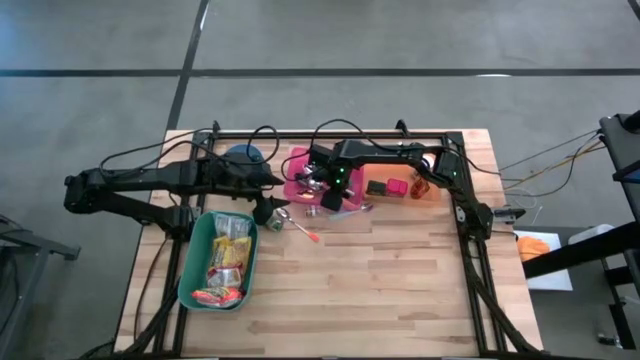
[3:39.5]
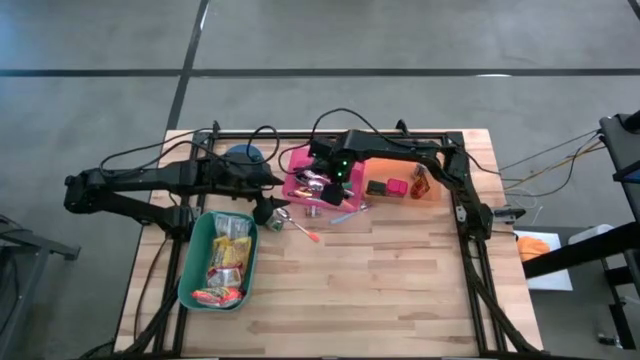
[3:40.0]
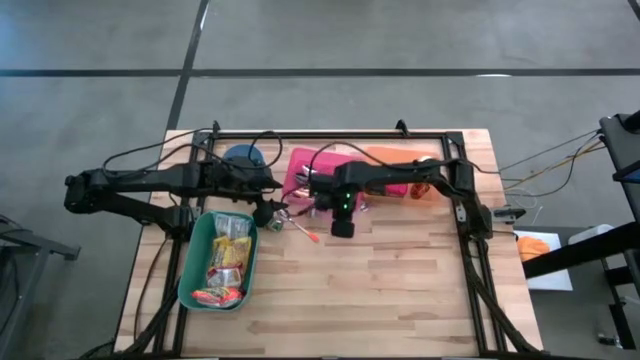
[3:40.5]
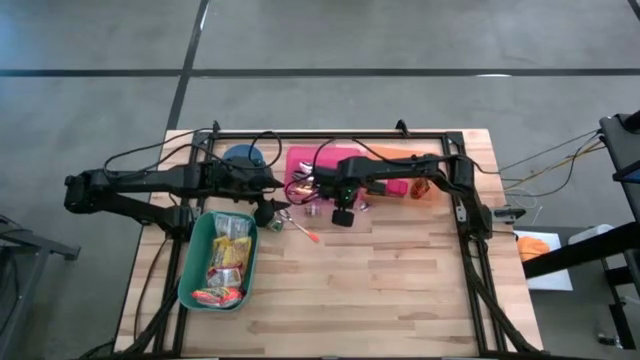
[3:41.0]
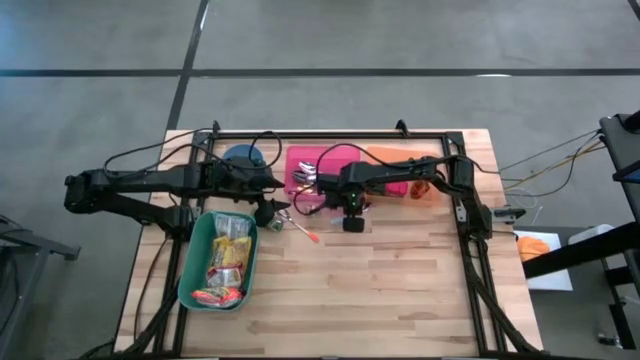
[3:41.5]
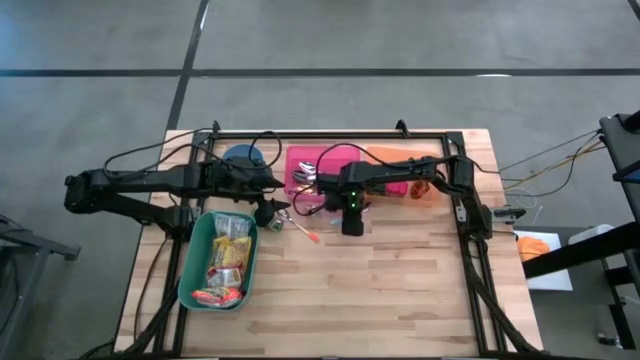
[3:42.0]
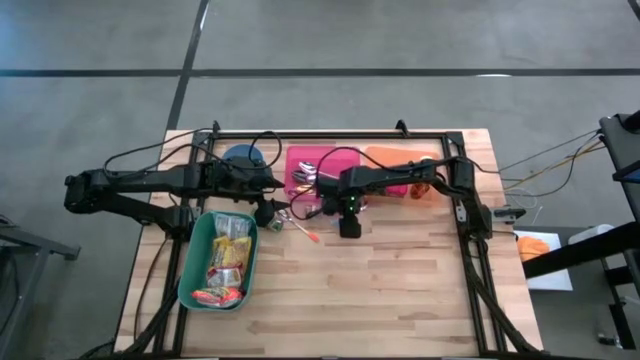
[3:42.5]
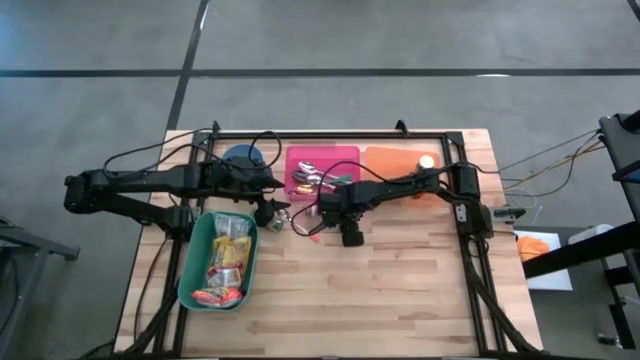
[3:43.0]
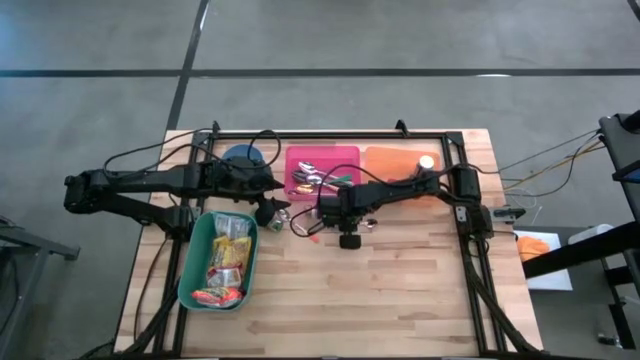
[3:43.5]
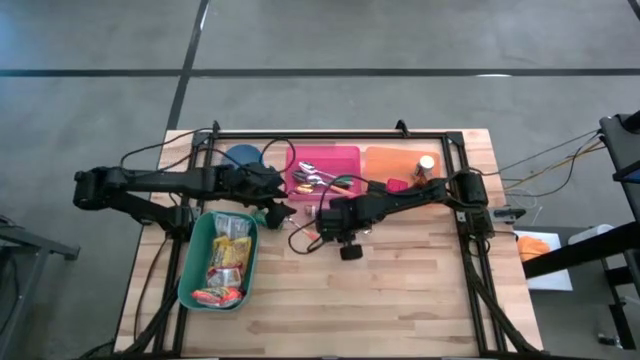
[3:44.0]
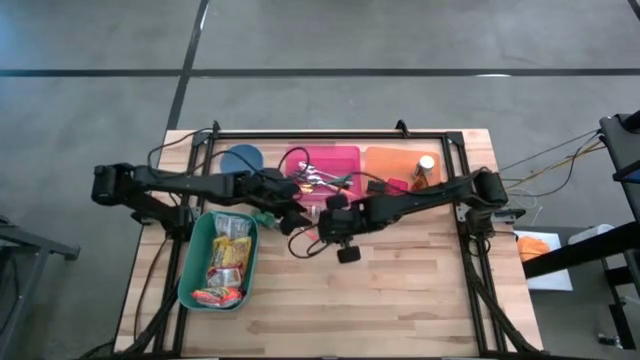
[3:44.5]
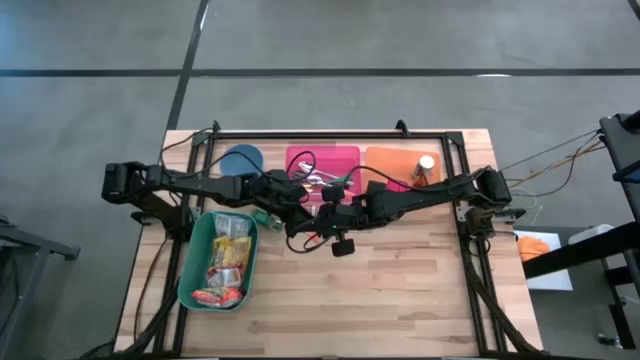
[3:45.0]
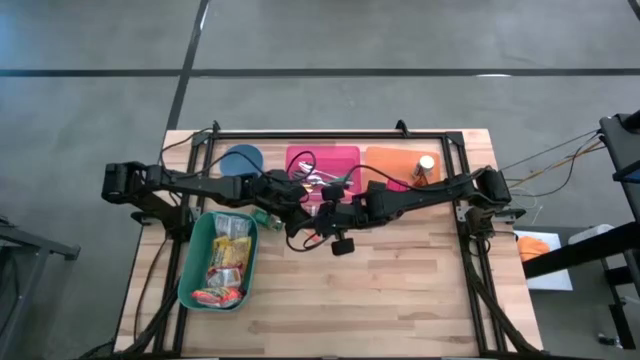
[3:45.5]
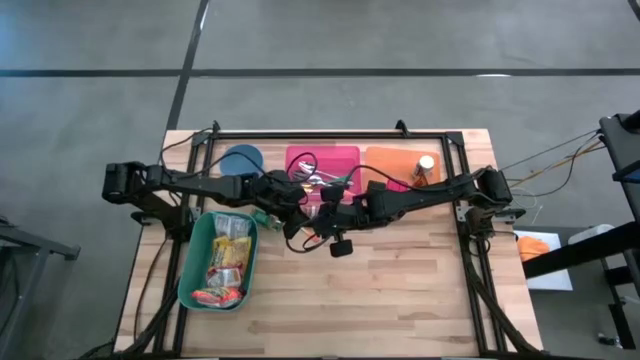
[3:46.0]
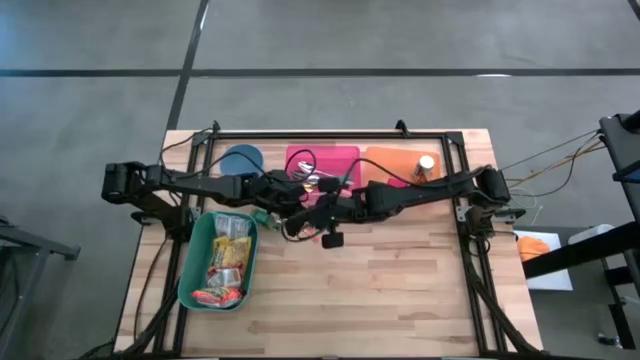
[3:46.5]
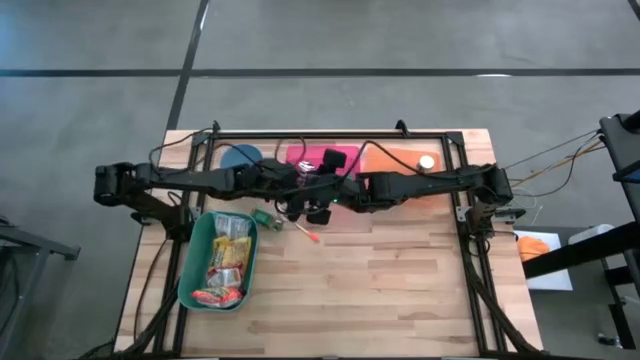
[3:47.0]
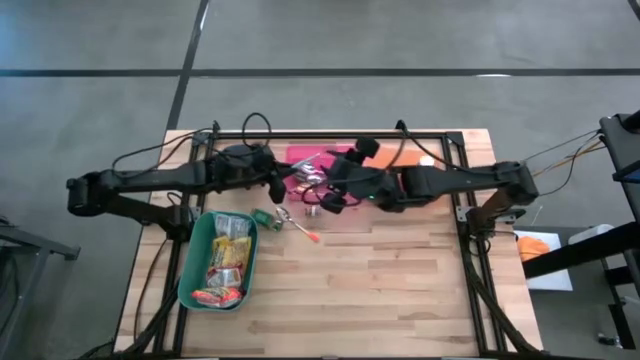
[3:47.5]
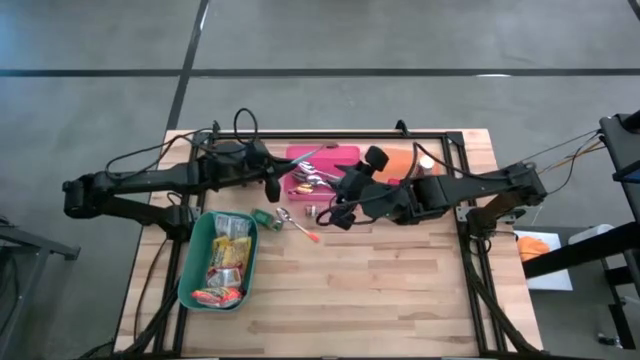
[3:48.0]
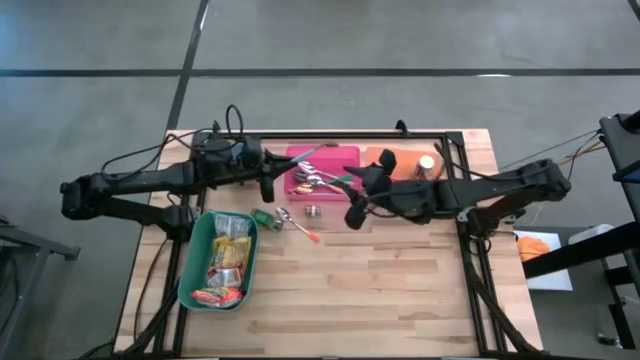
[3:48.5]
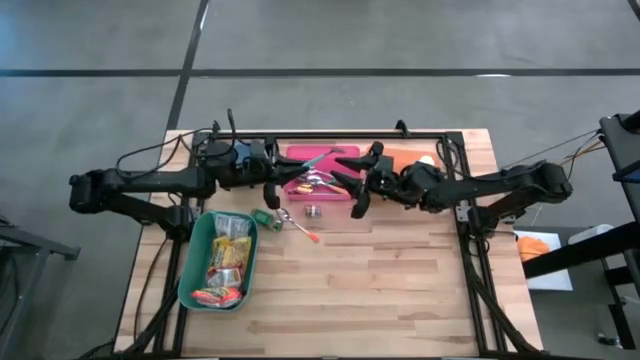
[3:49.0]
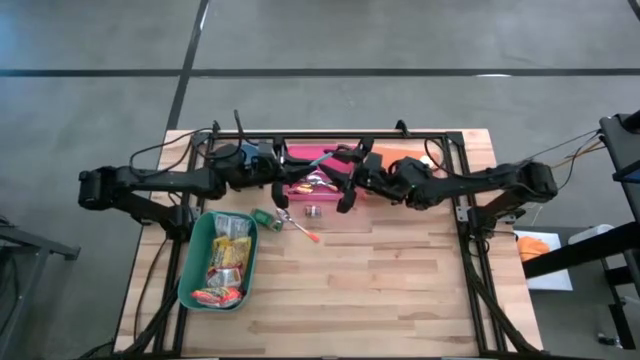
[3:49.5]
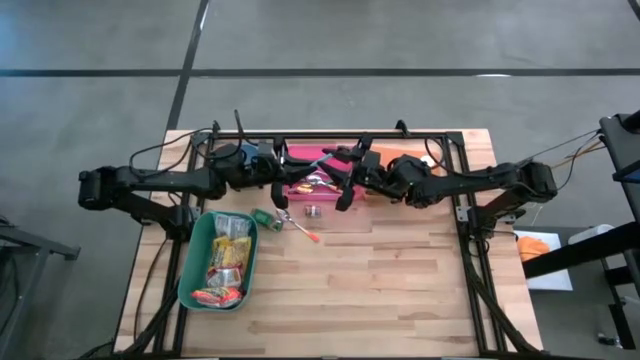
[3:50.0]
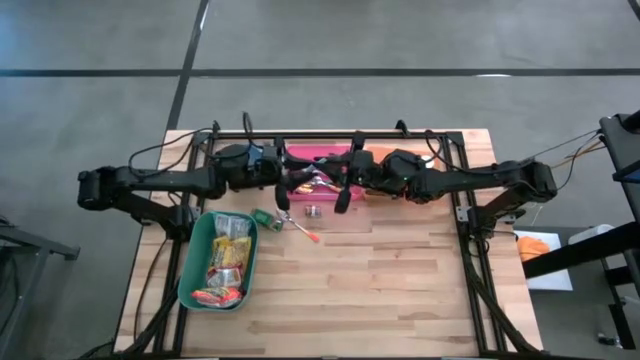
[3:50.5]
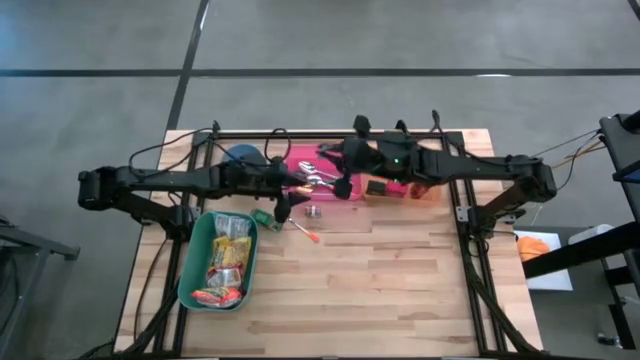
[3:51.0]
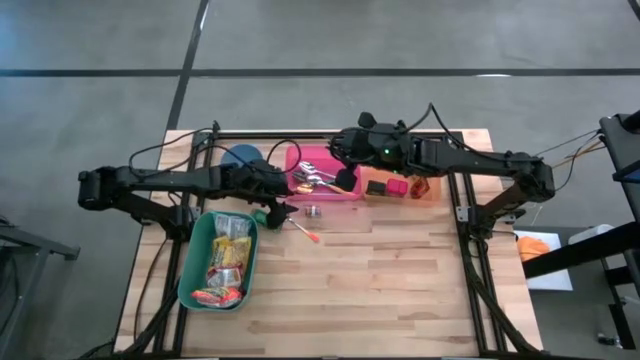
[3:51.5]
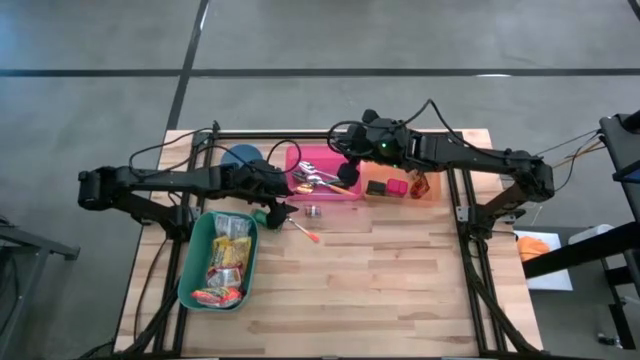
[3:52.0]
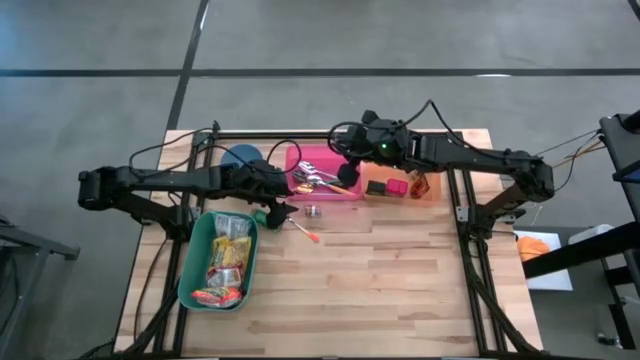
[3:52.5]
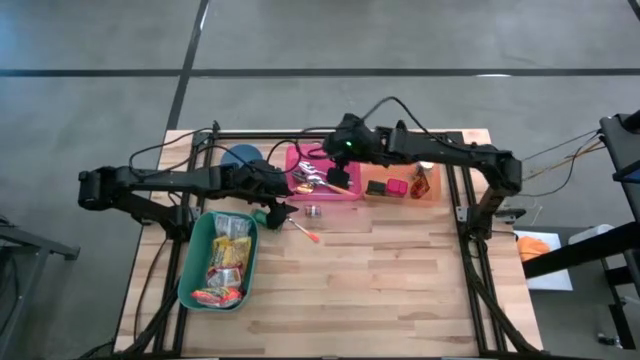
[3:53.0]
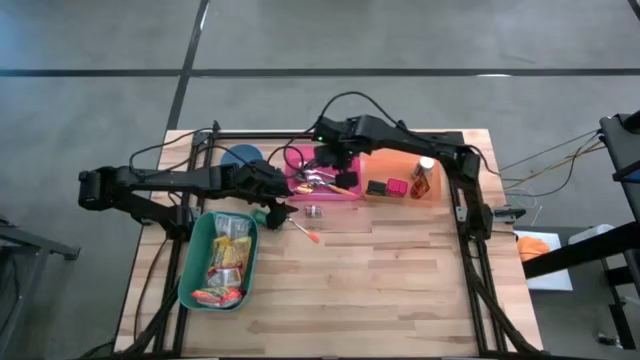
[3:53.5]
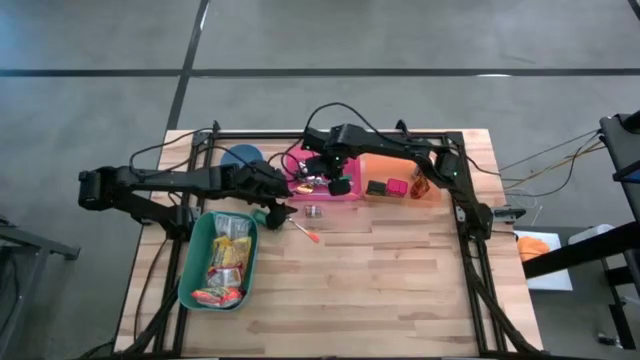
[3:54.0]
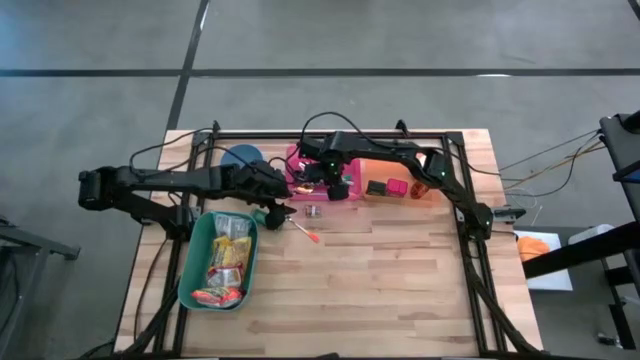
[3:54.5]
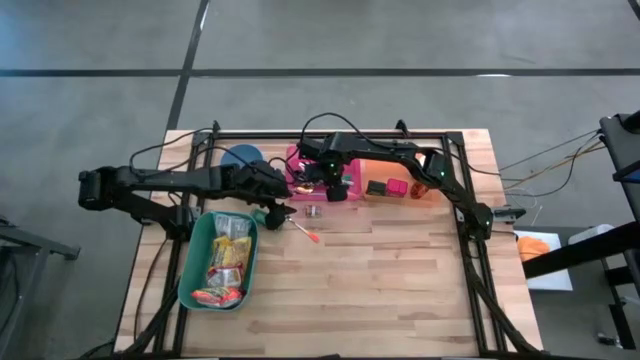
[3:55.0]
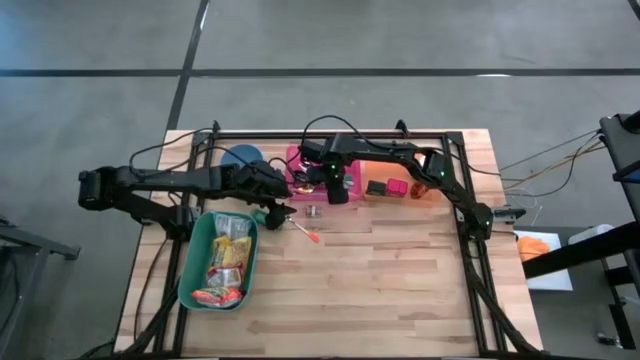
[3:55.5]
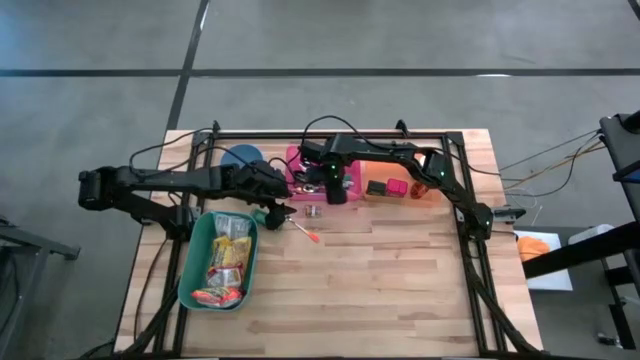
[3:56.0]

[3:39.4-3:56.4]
Put the blue spoon into the pink bin
